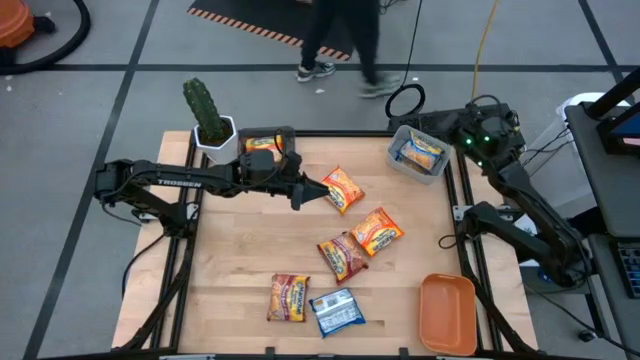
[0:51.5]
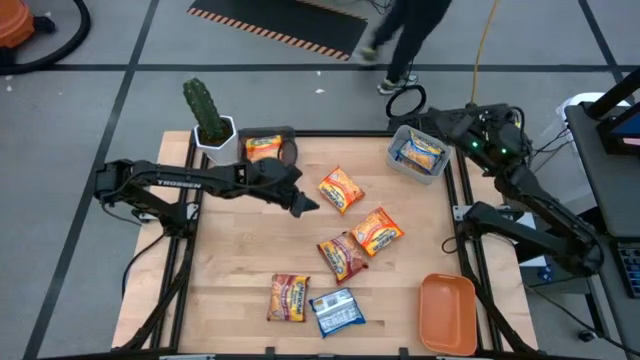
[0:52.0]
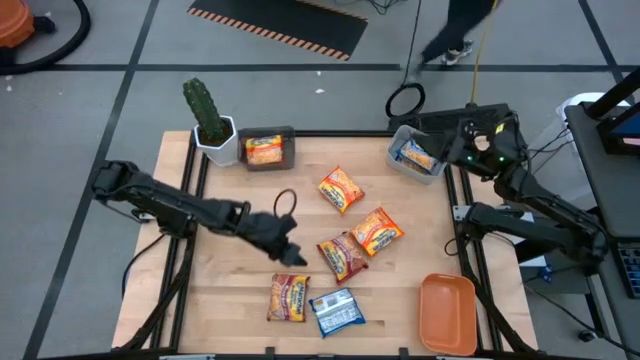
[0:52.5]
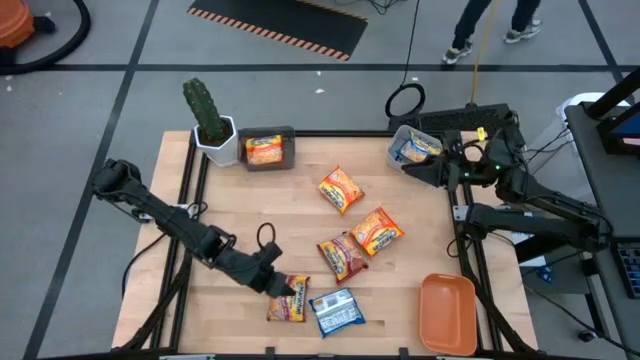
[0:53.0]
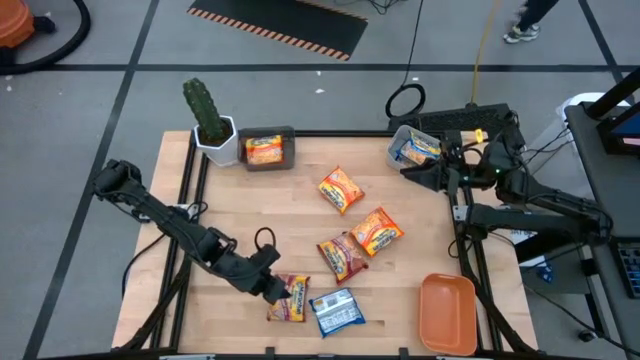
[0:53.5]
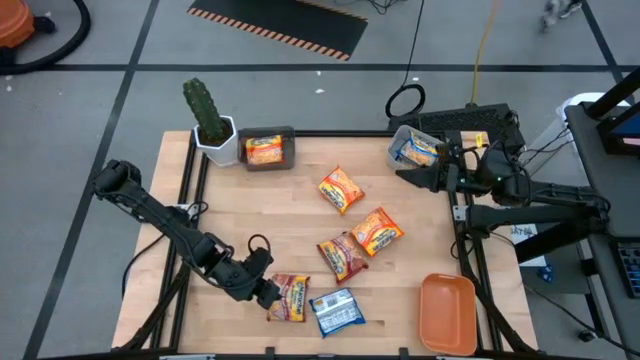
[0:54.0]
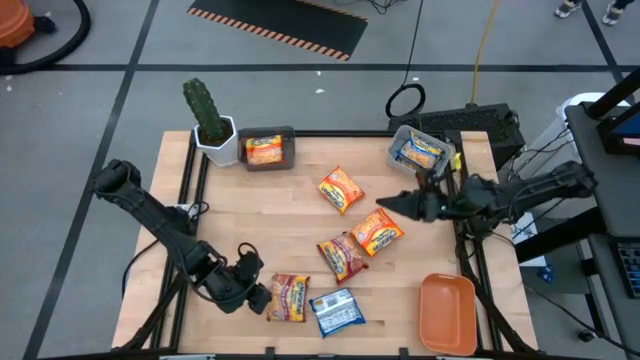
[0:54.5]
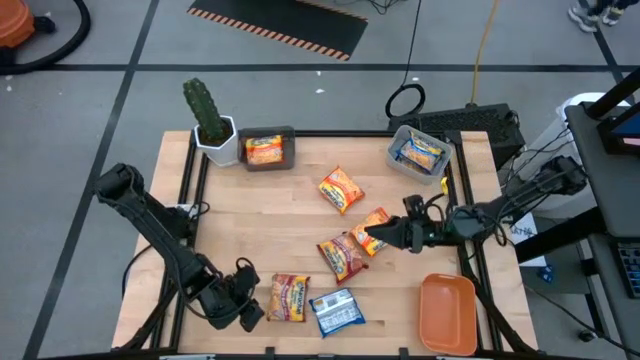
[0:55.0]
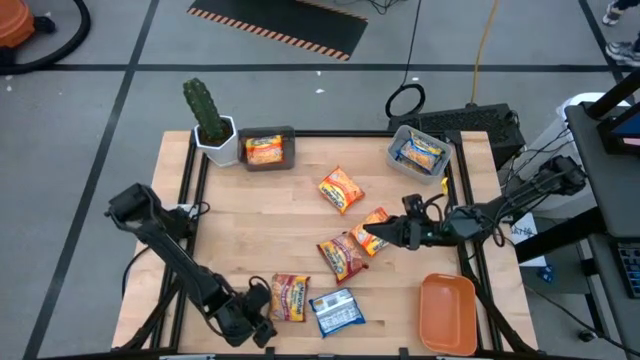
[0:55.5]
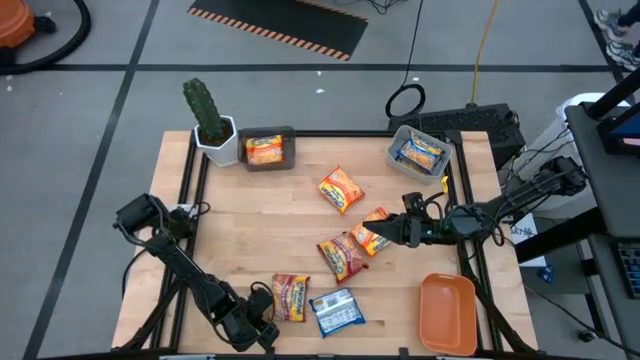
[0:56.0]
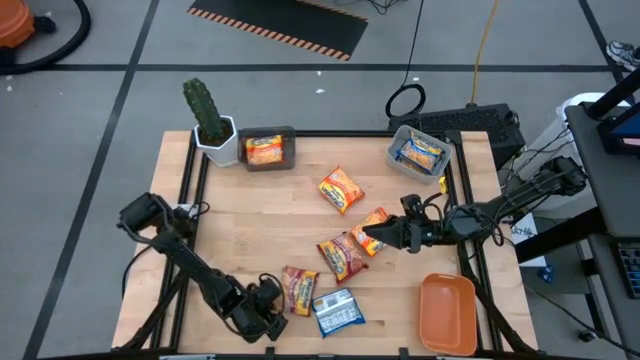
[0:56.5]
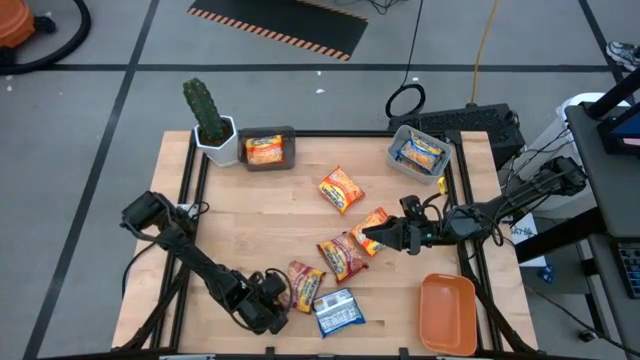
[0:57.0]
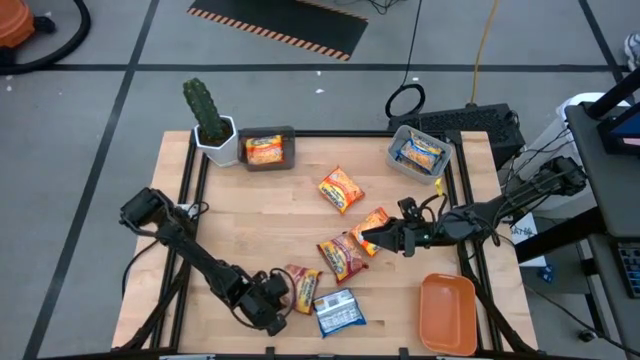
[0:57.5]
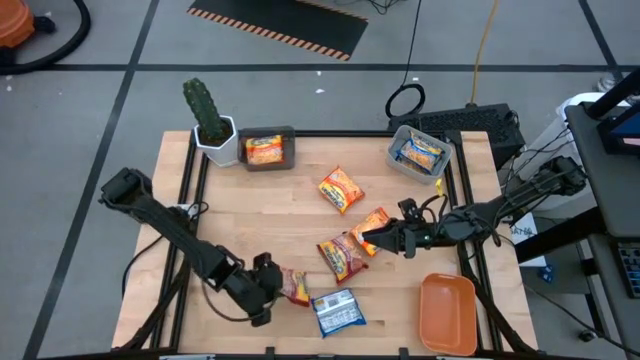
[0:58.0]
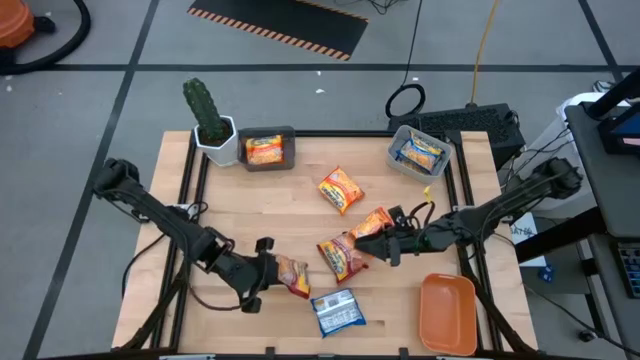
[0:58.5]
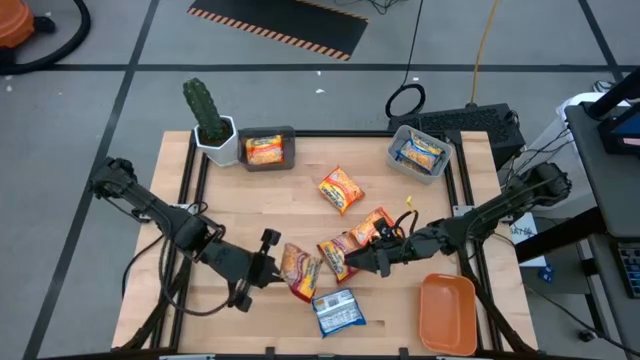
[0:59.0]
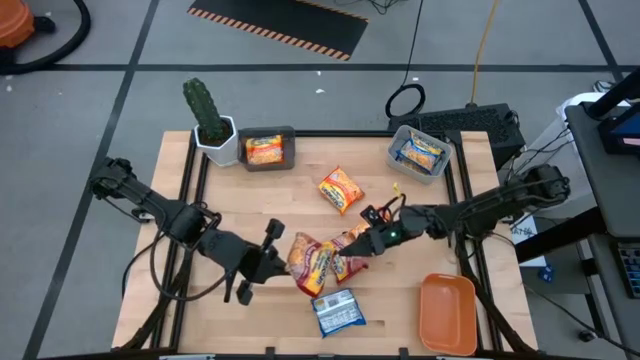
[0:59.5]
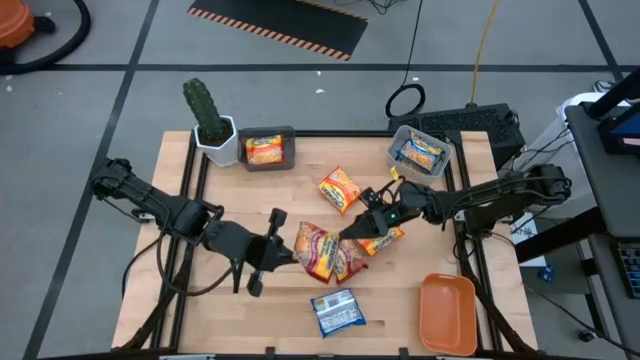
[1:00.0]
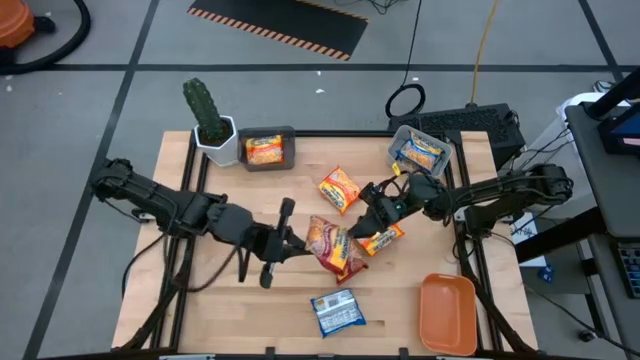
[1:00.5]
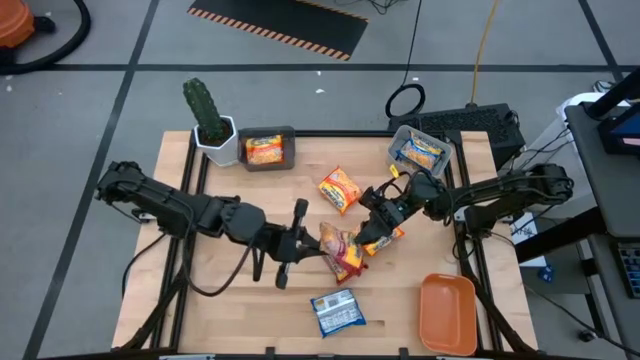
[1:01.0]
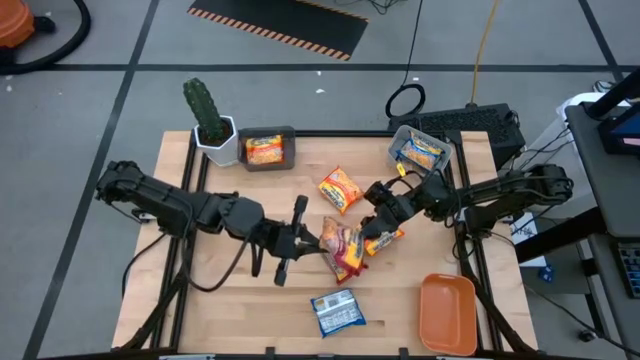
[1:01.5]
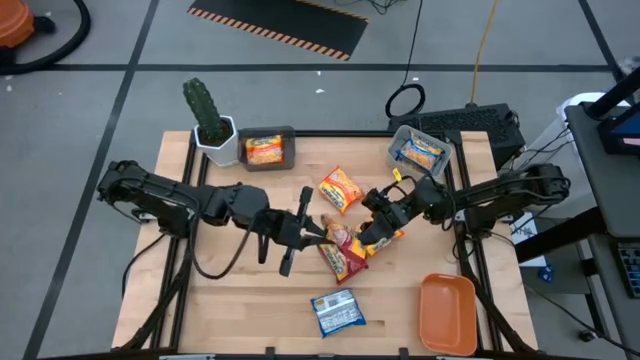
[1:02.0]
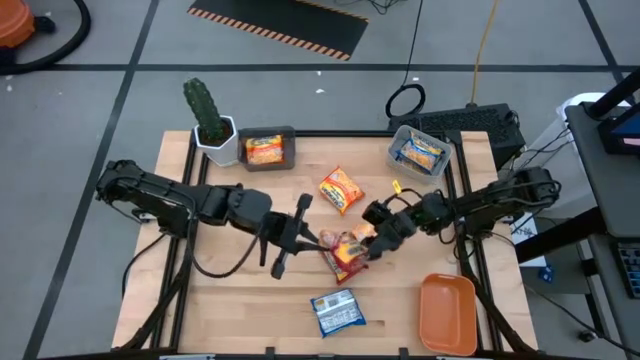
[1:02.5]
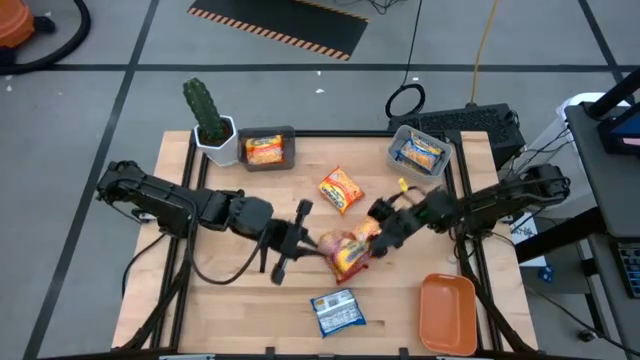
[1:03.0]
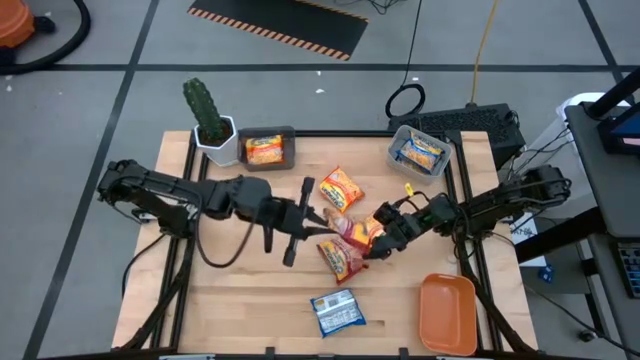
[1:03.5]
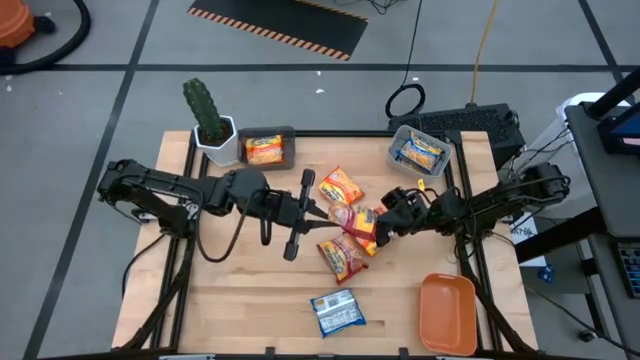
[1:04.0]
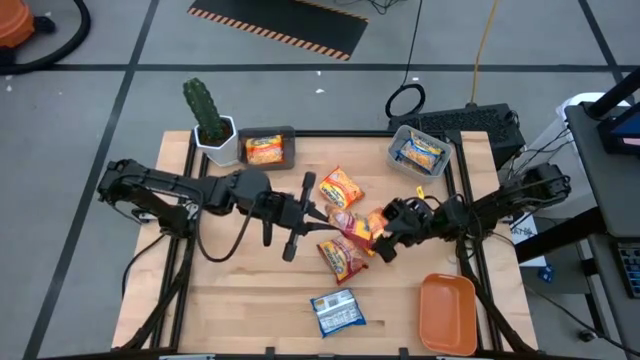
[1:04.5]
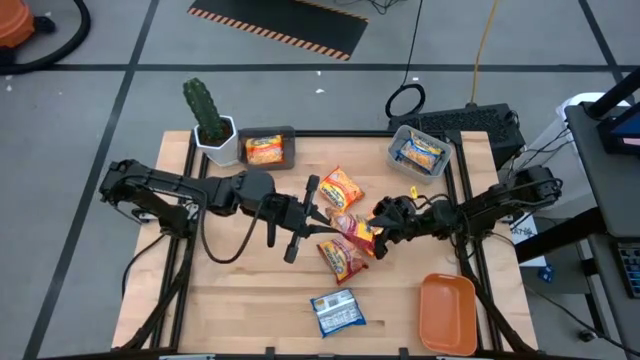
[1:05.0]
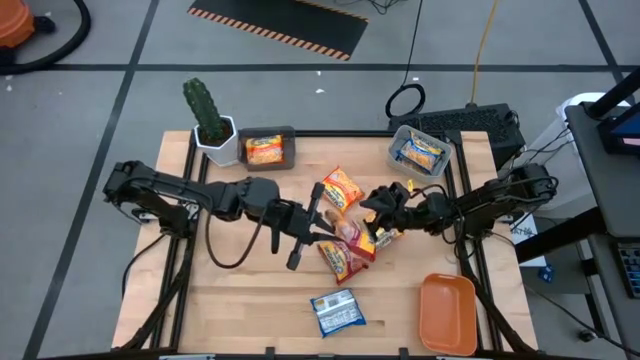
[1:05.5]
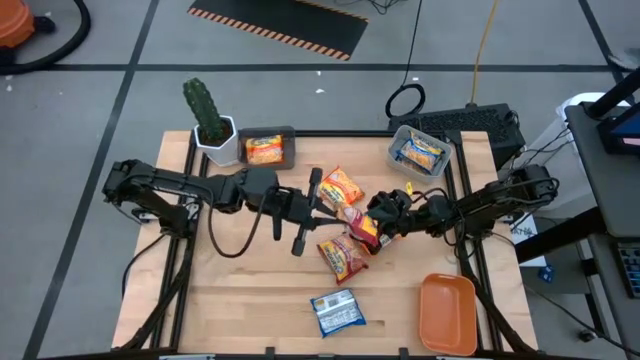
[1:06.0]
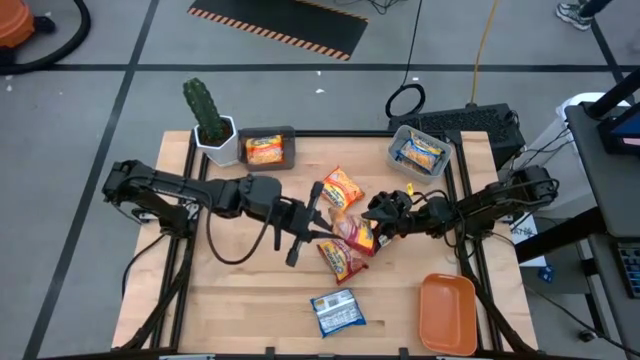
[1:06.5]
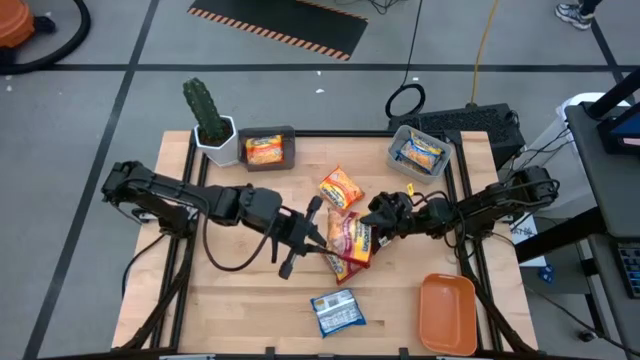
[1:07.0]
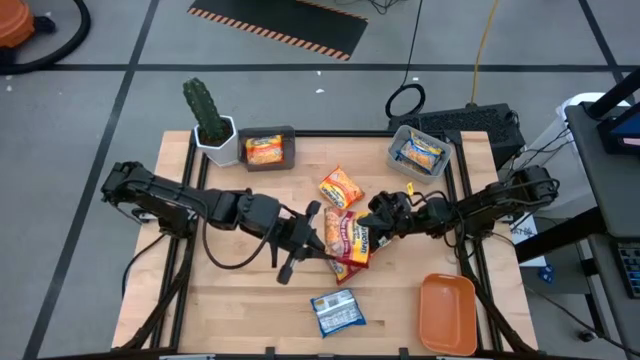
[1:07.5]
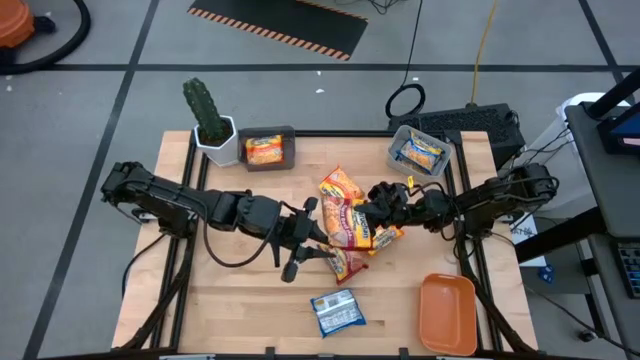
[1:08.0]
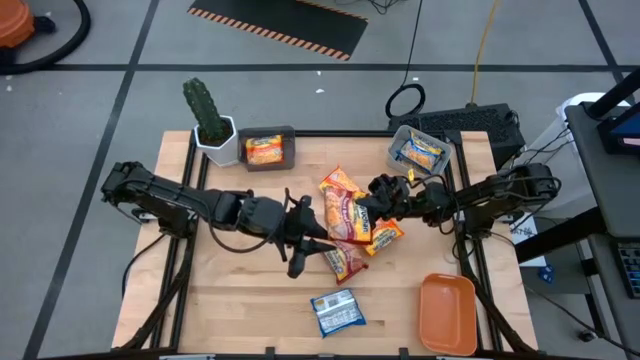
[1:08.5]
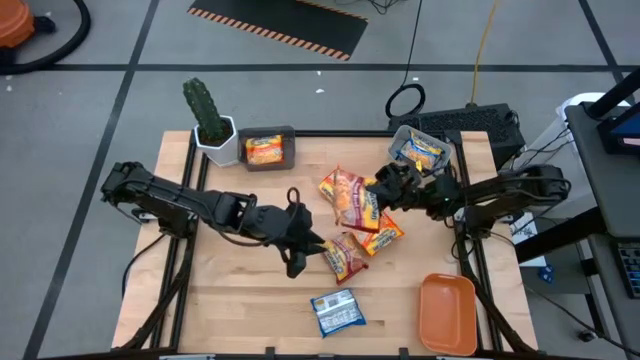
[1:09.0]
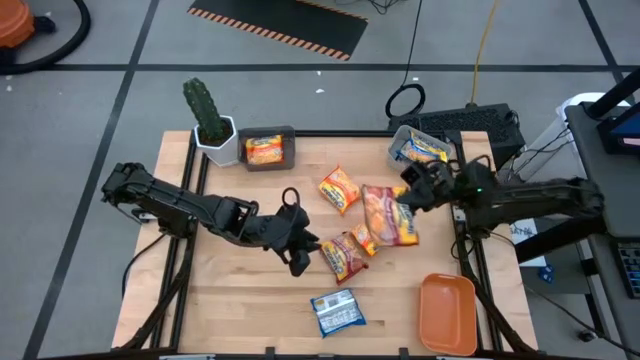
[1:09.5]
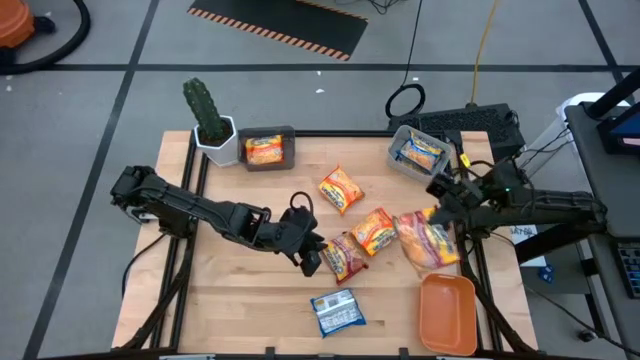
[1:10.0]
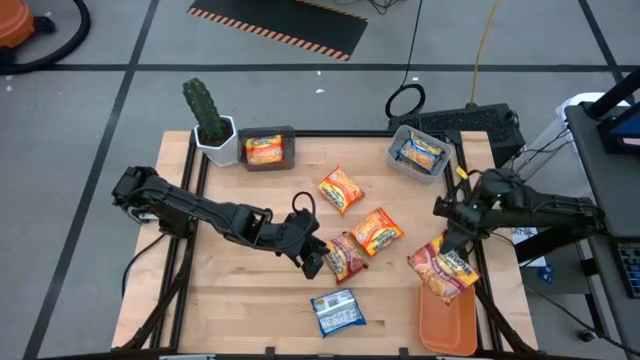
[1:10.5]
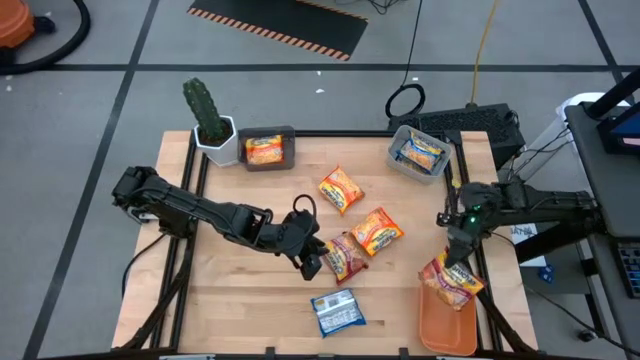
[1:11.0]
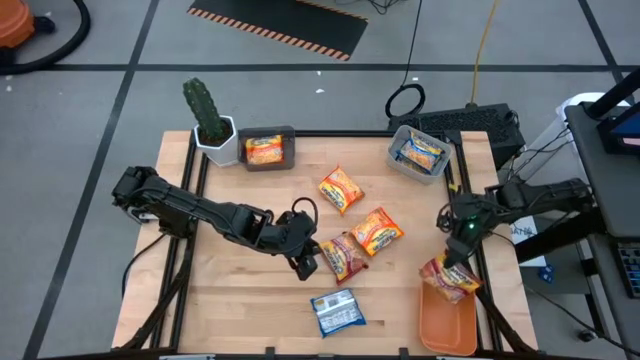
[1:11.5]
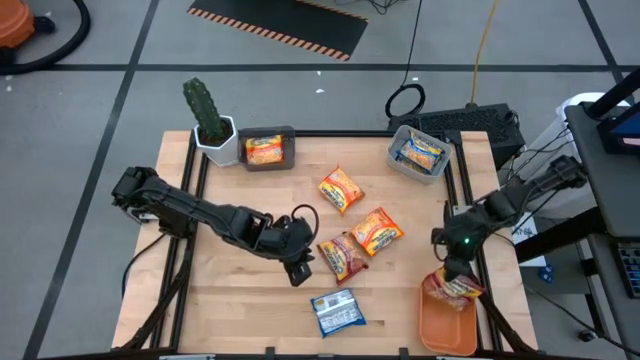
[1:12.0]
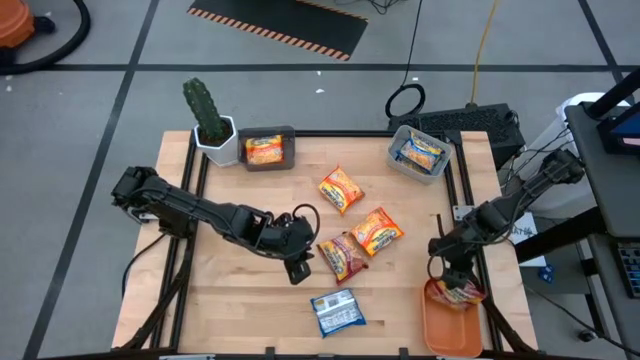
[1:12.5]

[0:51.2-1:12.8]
Task: Sort Maruchan noodles
Put the left red noodle pack into the orange bin
